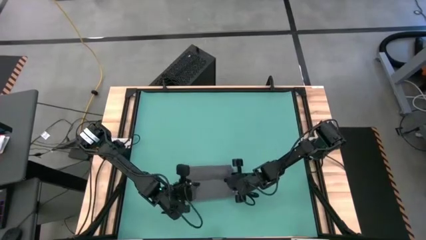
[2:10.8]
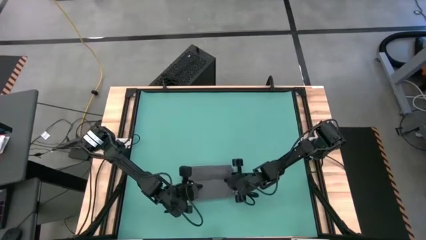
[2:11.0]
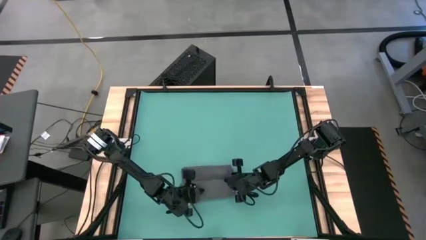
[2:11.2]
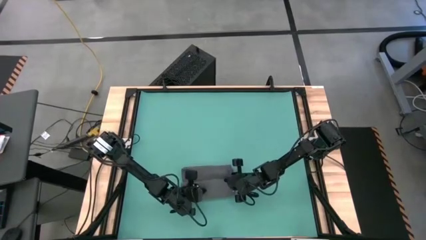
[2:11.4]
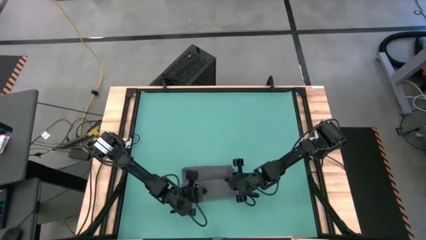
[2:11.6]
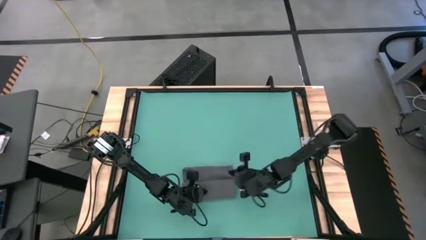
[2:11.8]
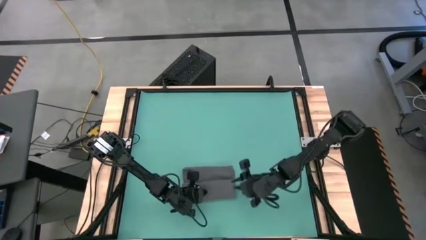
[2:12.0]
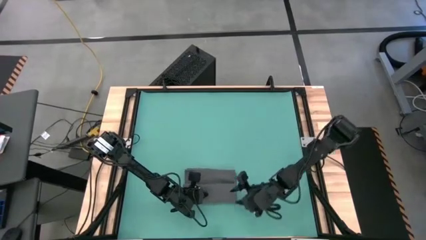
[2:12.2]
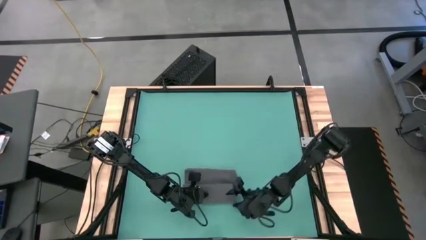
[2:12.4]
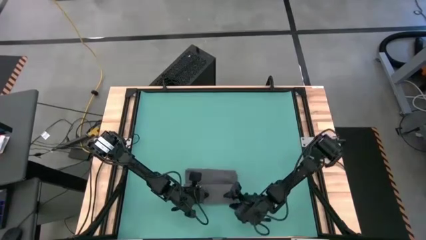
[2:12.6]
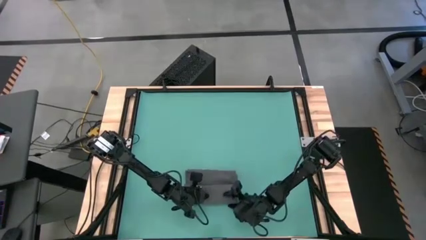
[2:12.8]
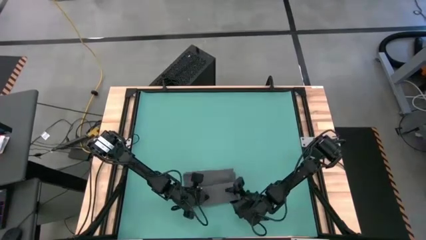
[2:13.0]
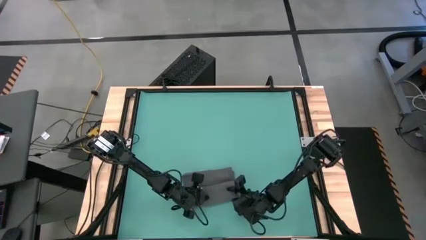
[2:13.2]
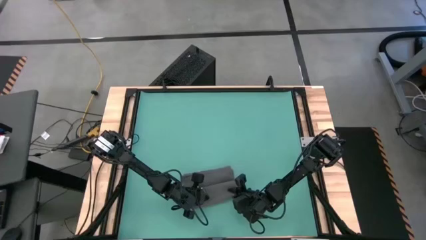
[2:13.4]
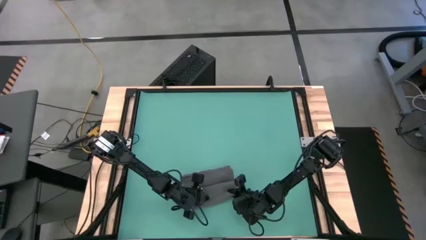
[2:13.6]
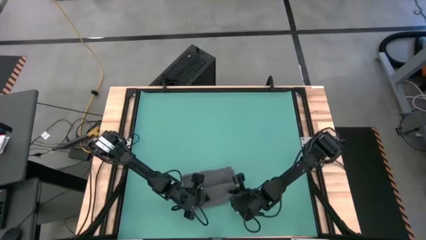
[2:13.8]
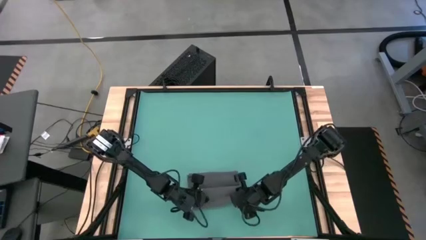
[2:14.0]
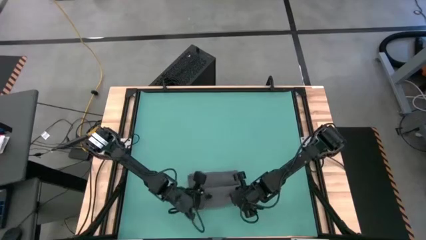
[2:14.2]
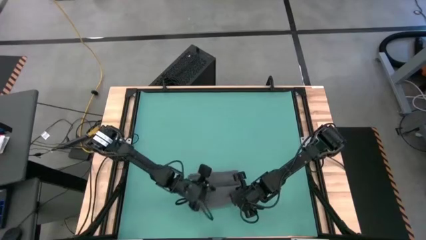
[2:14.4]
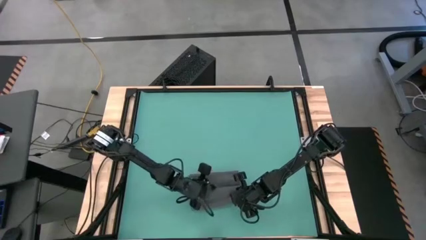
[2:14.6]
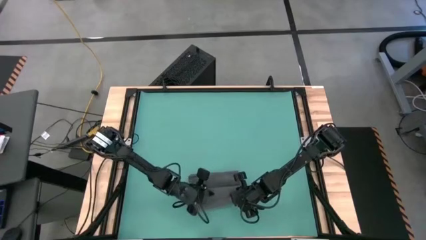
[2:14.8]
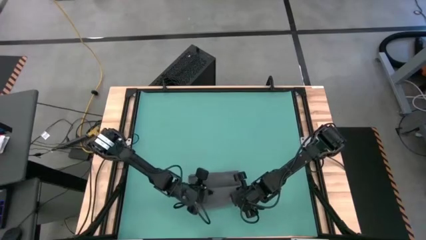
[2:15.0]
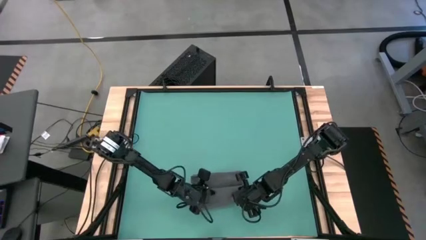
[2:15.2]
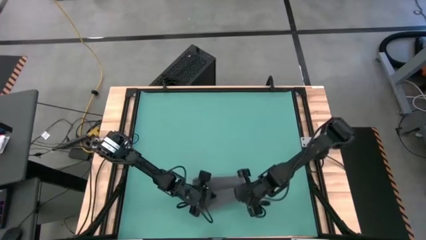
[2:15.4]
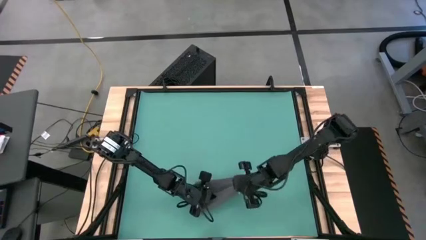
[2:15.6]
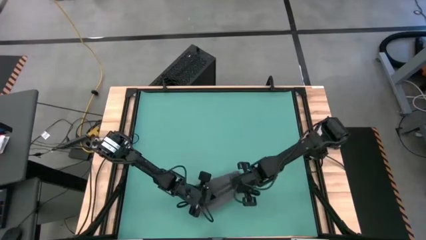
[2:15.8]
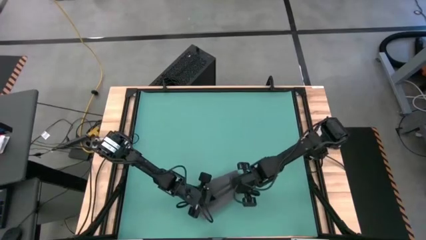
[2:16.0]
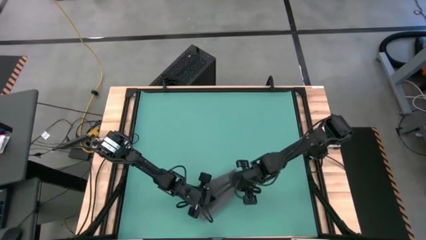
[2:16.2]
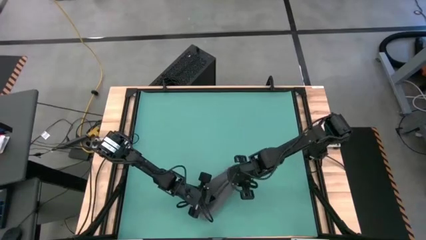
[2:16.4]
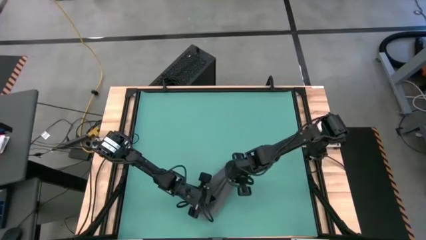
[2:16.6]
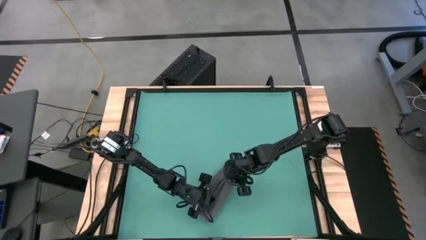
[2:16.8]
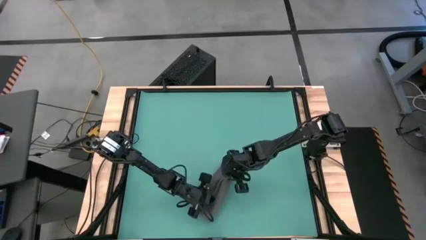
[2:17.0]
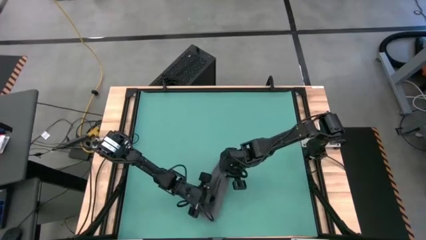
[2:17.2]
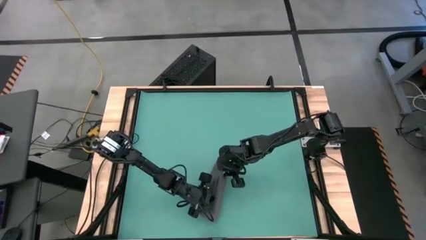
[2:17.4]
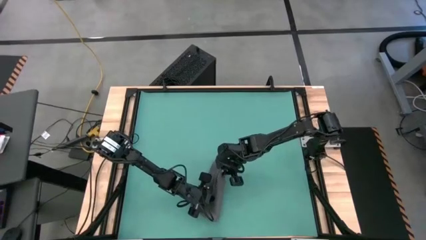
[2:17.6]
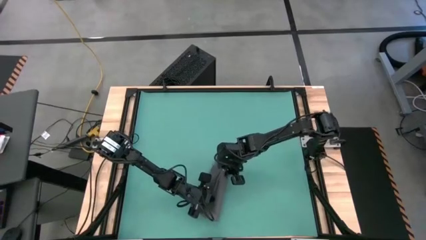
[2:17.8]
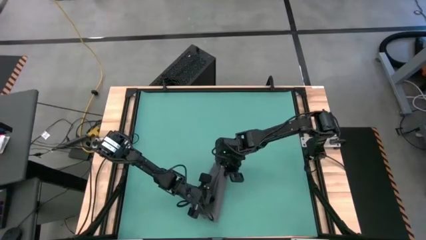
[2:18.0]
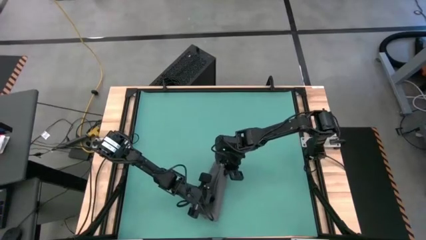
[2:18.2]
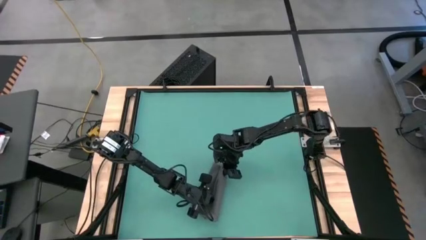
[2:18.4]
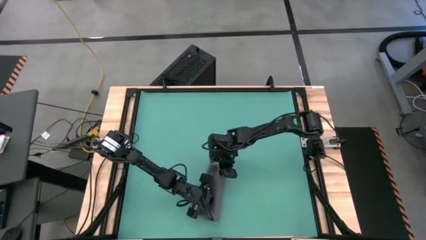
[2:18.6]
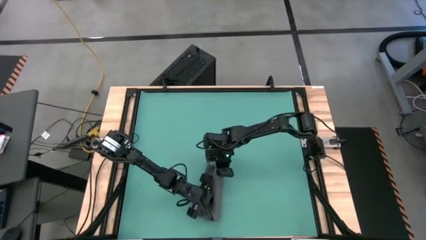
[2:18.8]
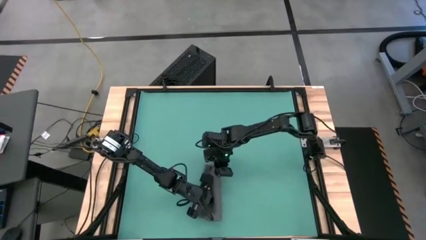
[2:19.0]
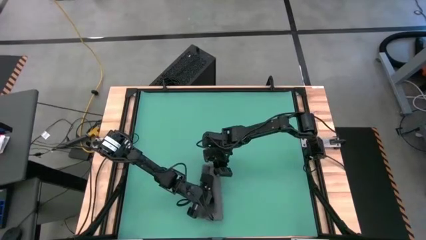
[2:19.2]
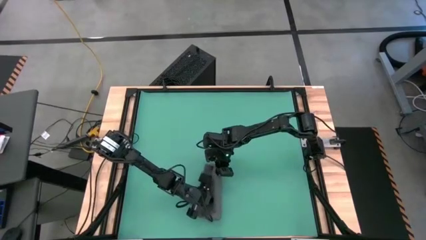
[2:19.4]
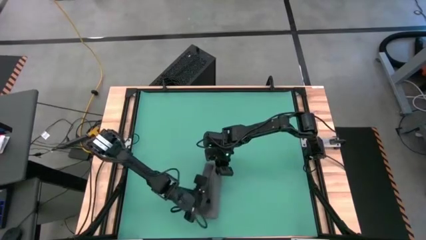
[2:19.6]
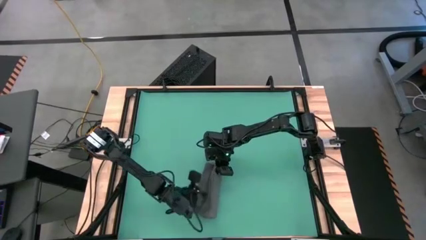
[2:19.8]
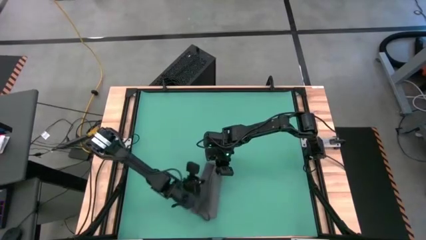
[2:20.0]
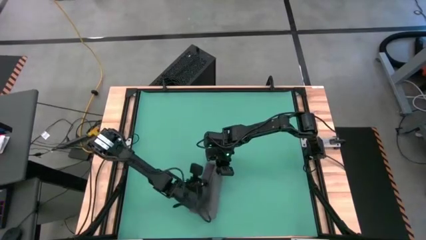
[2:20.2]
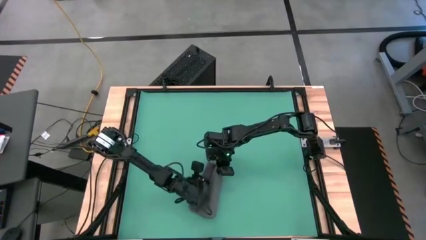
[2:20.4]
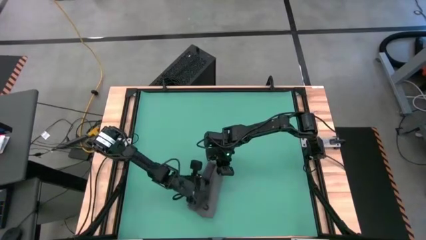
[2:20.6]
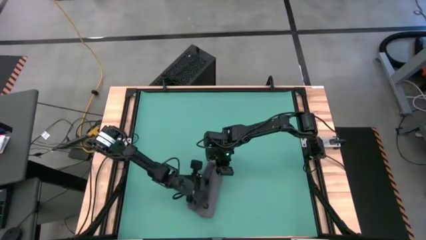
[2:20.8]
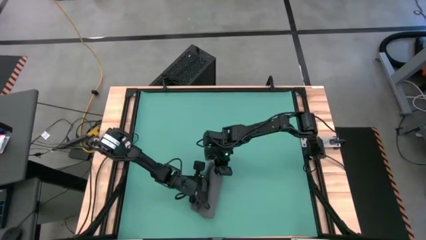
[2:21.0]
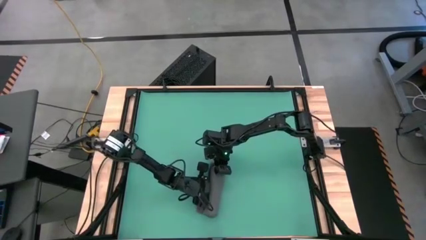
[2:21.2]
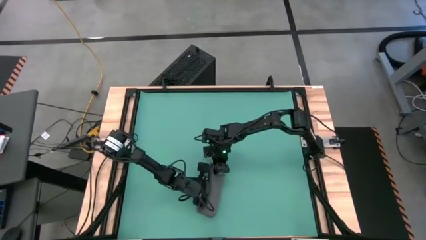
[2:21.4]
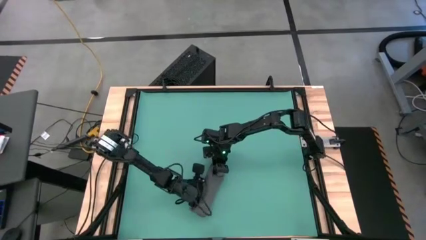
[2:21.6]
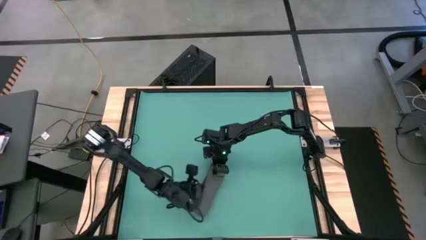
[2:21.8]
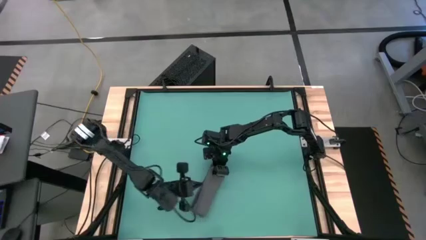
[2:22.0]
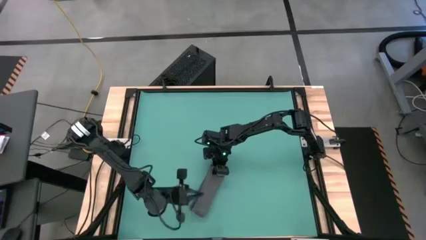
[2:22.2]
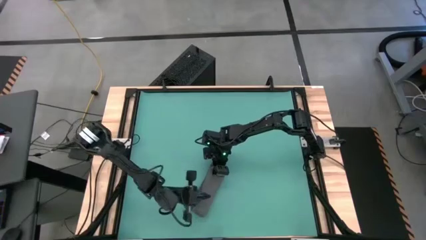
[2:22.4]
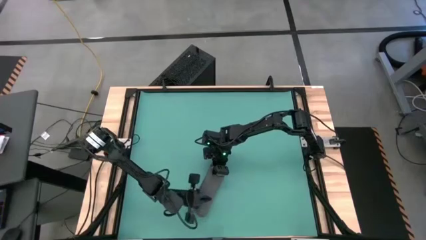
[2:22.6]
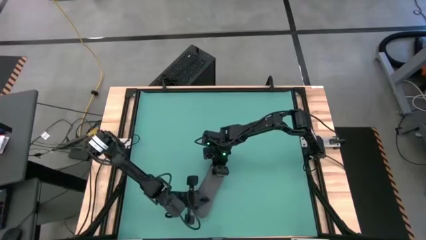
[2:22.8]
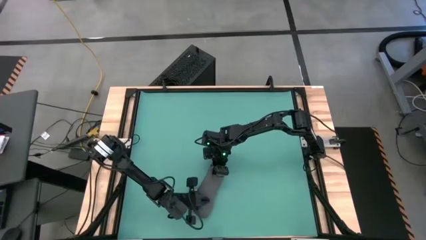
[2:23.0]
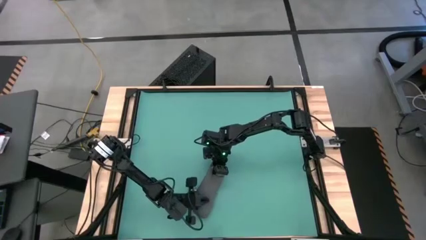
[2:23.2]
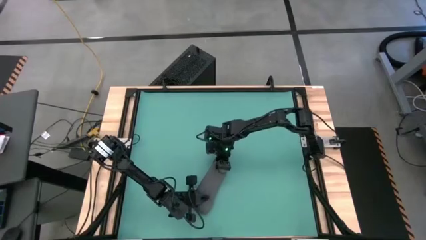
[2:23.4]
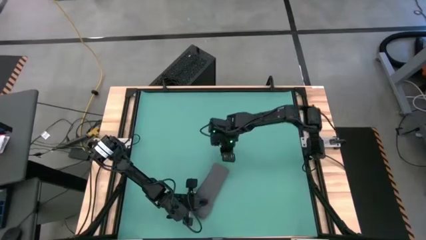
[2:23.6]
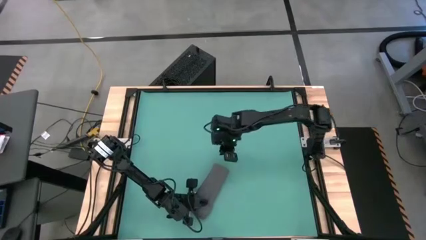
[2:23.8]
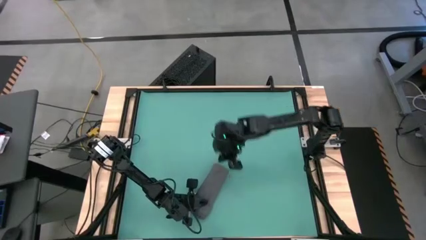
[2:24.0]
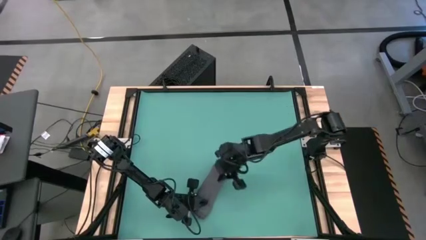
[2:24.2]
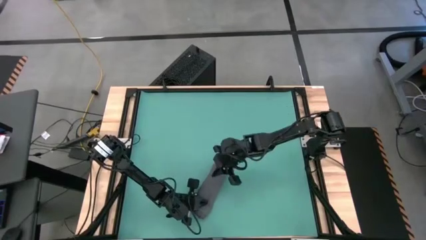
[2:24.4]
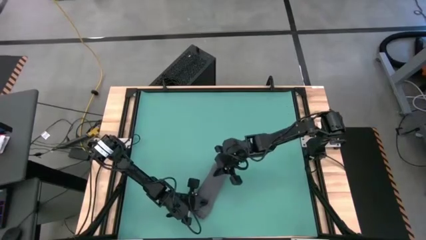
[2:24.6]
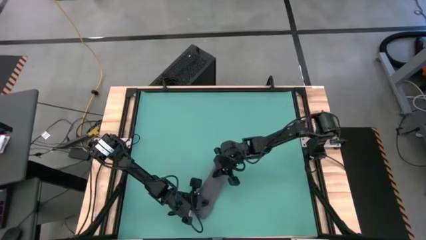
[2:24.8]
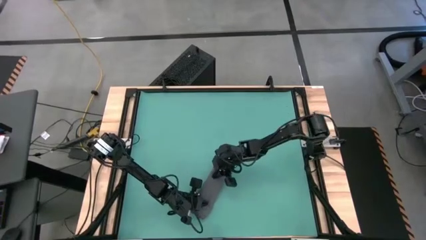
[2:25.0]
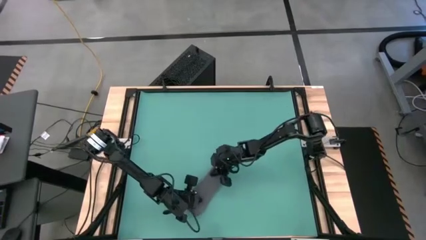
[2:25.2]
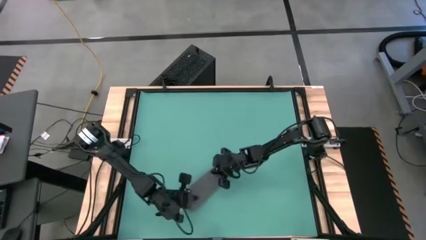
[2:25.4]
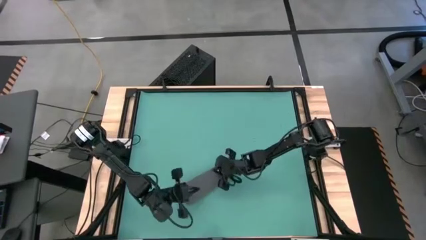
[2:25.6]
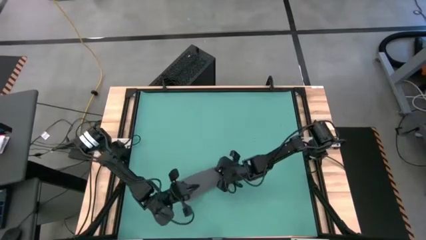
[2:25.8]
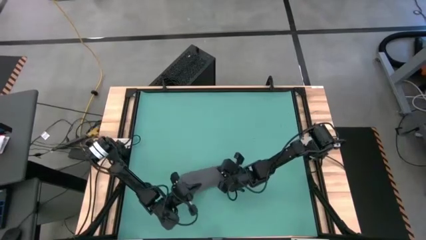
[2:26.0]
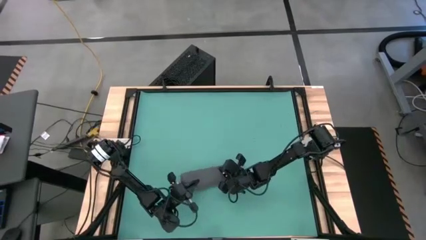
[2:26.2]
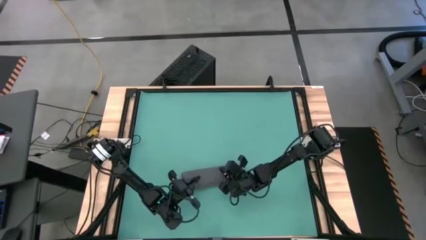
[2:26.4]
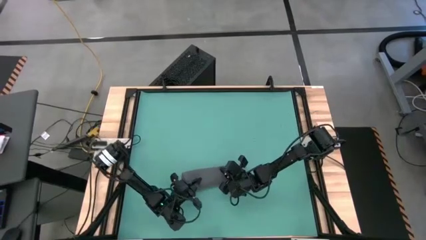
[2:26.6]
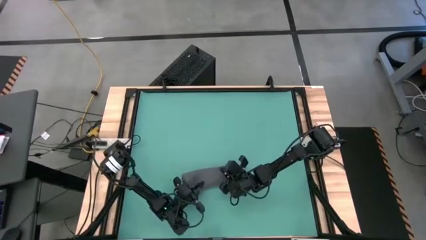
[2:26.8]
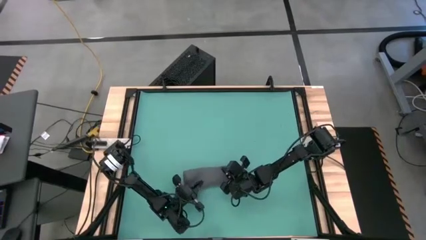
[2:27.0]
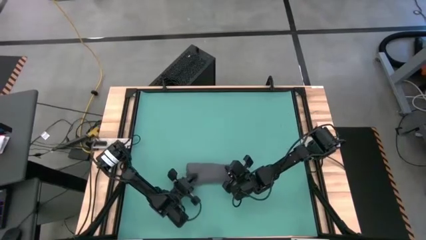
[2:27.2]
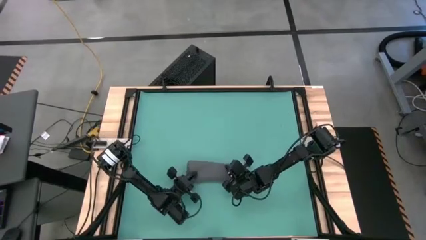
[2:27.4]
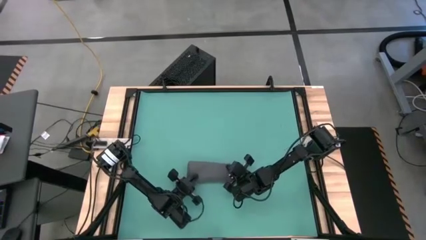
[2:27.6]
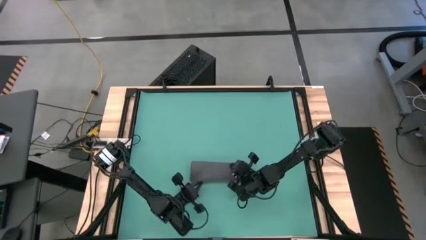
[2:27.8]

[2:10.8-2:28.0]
Task: Roll towel
Roll the gray towel
